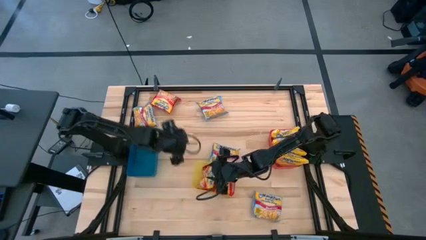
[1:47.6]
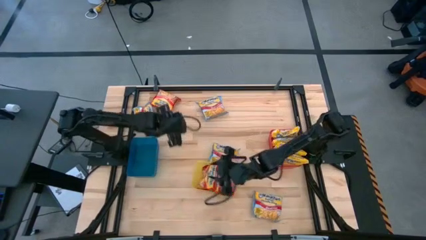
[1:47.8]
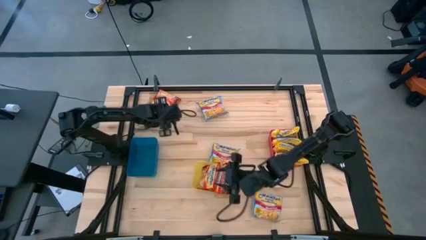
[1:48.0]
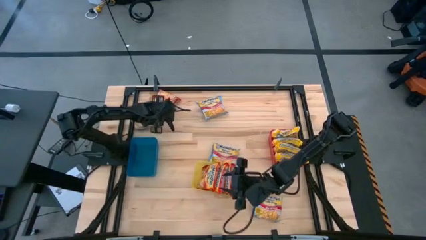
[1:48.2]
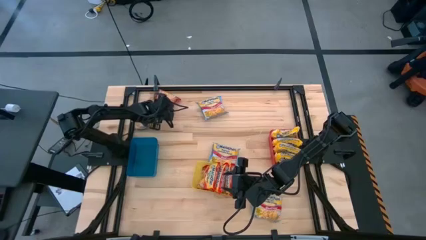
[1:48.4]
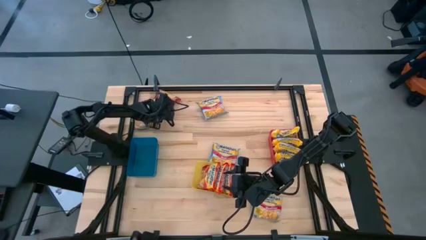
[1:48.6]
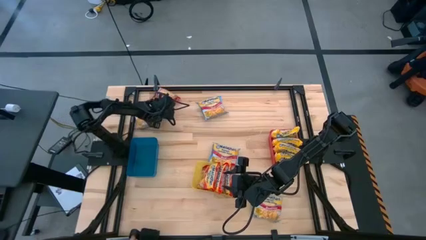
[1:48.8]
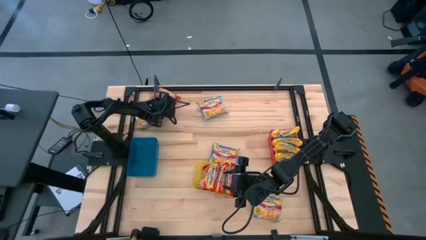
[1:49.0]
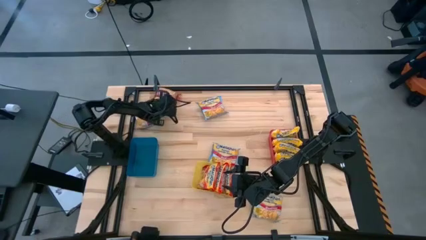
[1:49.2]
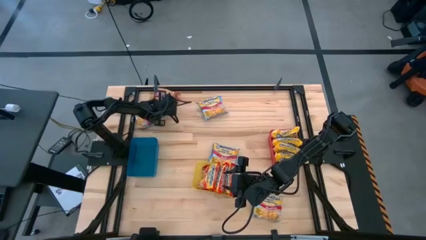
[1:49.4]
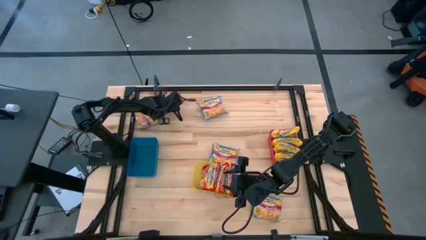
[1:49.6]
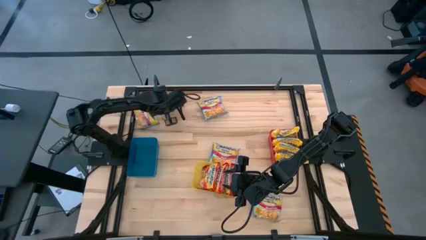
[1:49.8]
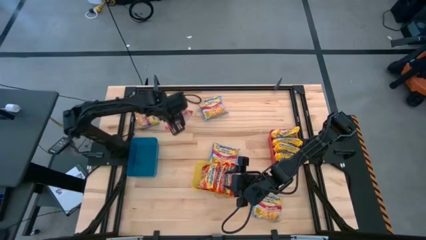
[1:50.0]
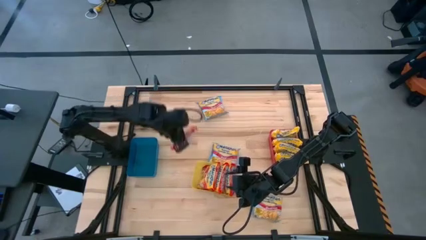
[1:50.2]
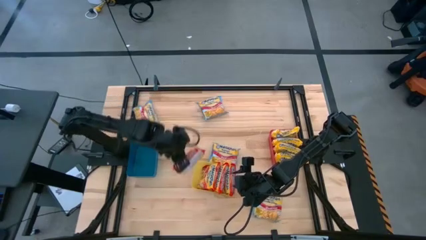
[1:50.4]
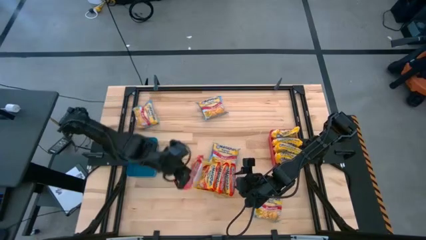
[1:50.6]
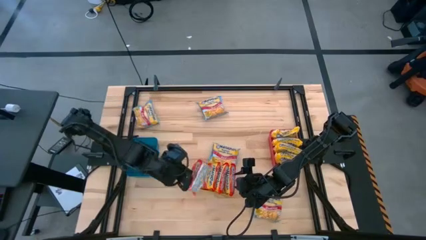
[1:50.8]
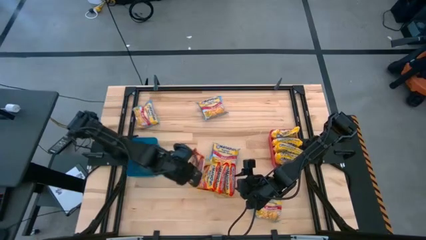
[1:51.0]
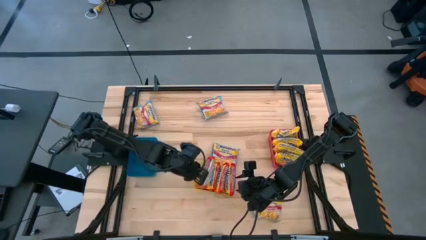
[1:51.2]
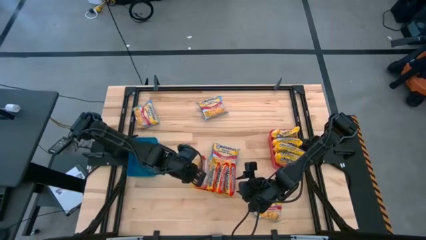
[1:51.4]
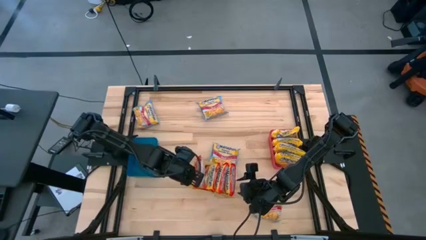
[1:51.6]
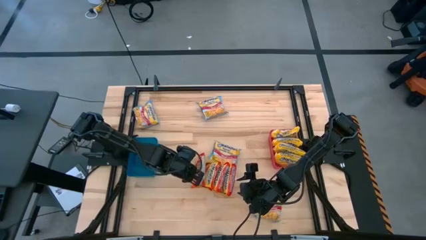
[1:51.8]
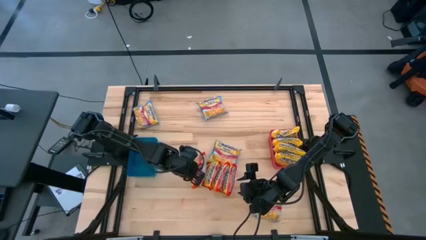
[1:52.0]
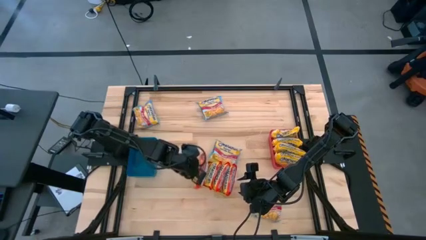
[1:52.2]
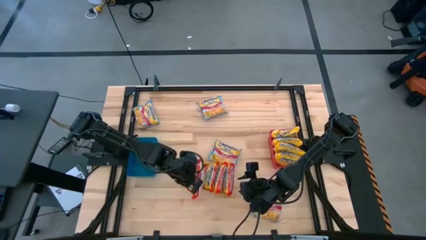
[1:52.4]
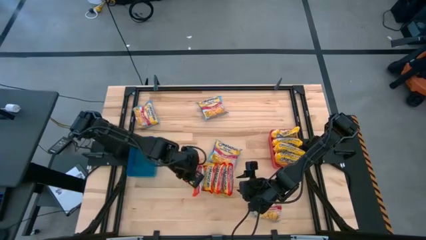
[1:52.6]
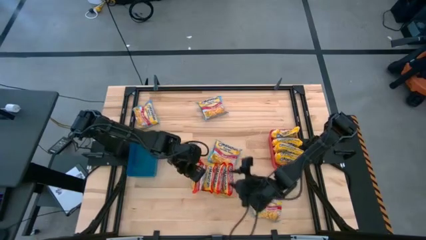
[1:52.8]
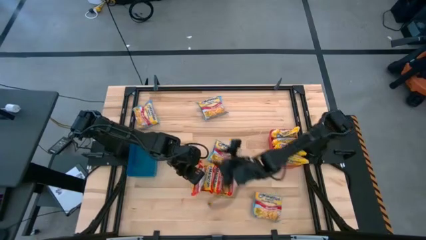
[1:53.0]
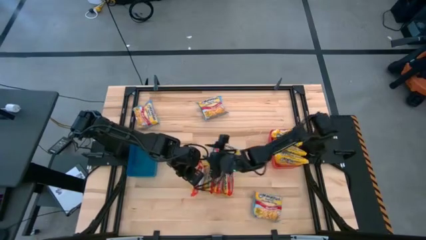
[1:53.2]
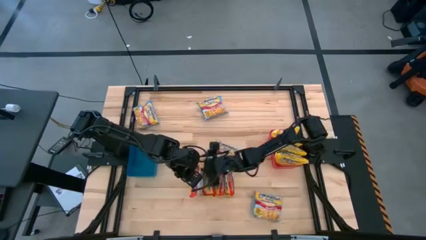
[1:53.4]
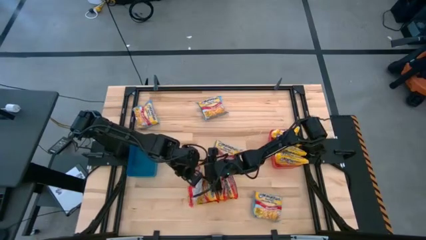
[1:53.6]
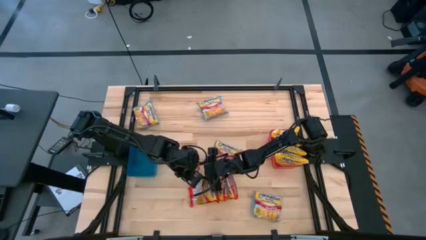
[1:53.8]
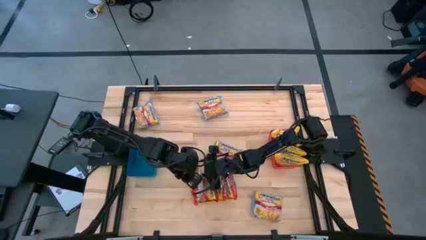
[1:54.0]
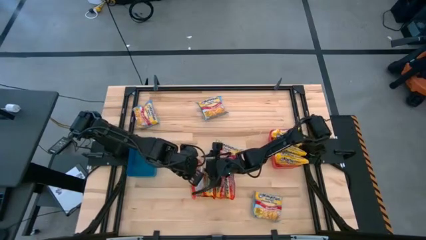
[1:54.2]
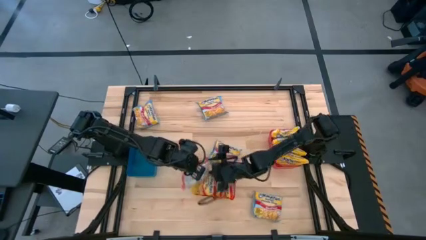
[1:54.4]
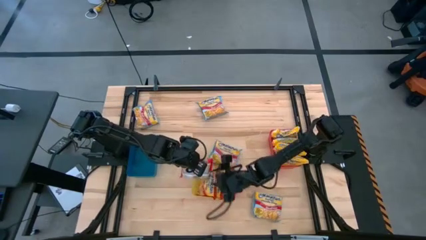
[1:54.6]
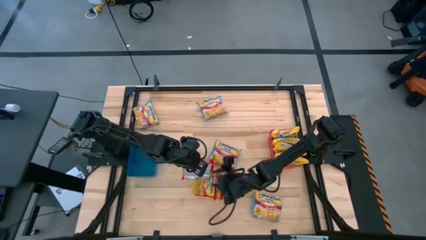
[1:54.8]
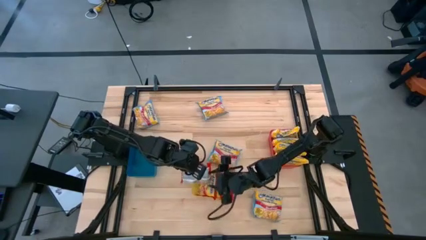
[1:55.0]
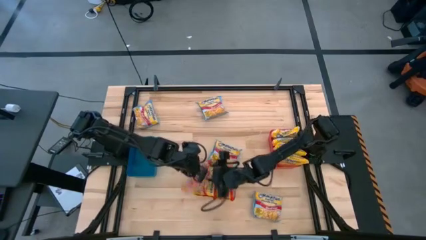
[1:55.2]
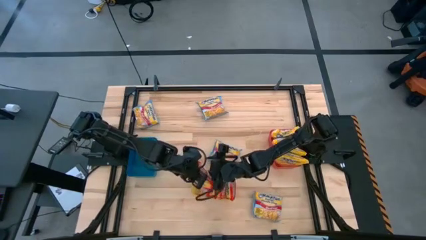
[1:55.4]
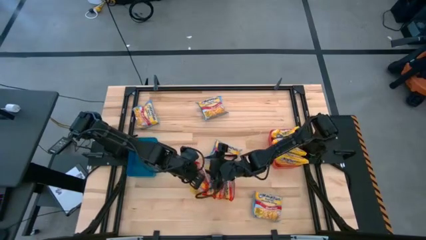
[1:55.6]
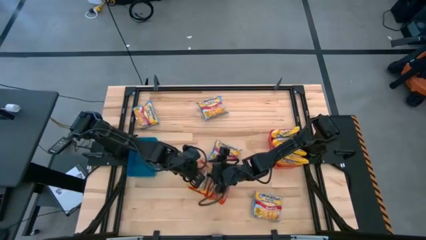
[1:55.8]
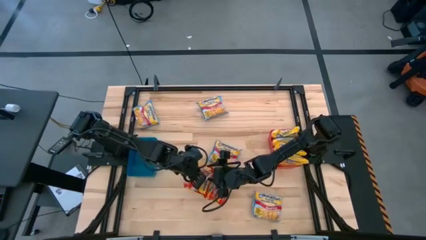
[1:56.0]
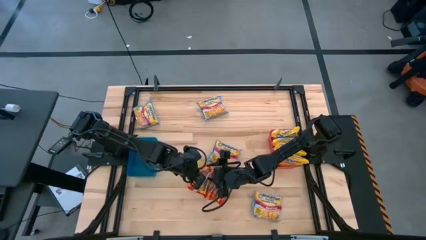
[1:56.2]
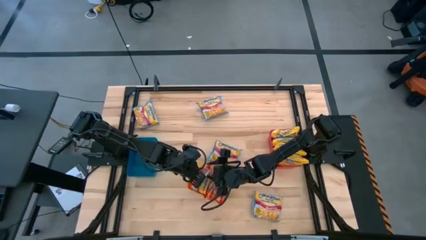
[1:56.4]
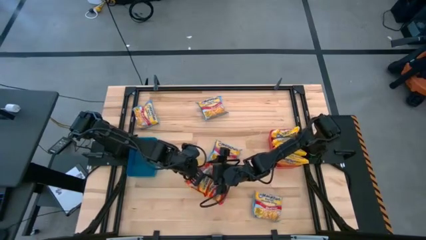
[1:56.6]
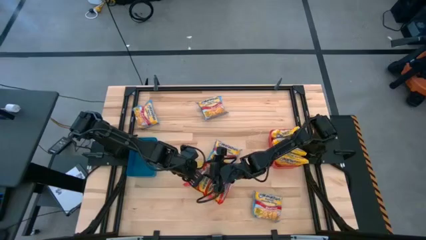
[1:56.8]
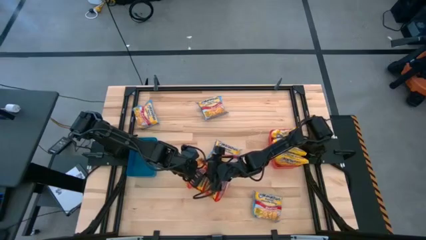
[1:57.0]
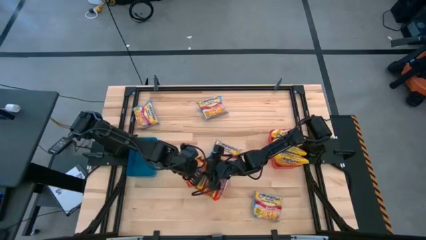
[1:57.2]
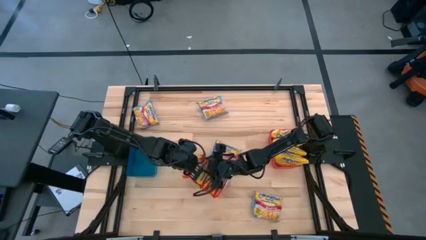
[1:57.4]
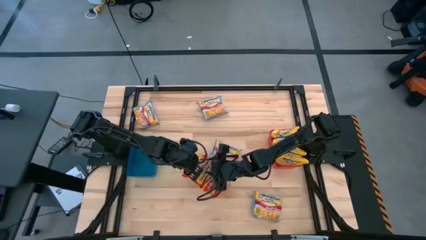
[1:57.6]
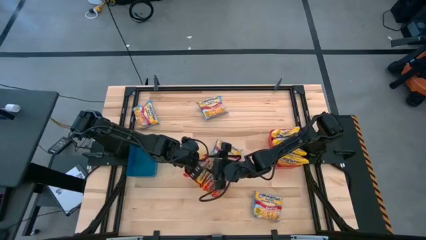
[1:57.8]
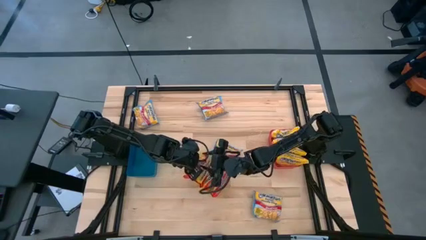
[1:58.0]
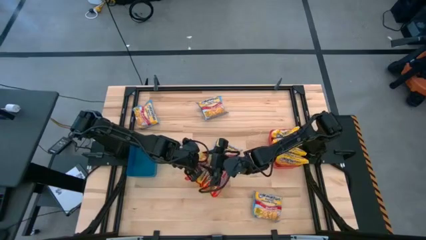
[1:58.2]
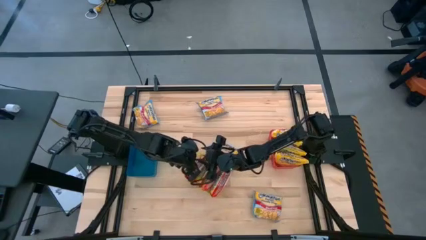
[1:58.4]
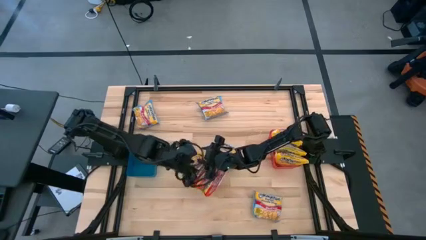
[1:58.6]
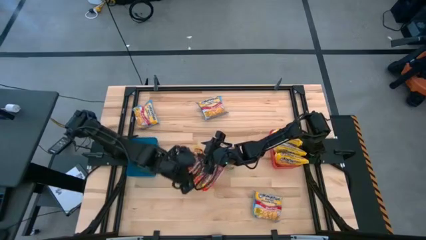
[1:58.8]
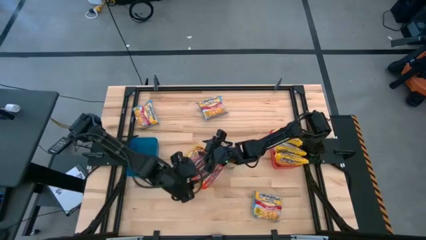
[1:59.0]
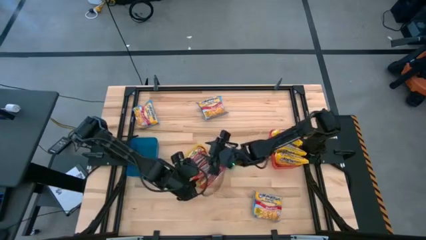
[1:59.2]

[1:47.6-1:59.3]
Task: Sort Maruchan noodles
Put the red noodle pack into the yellow bin

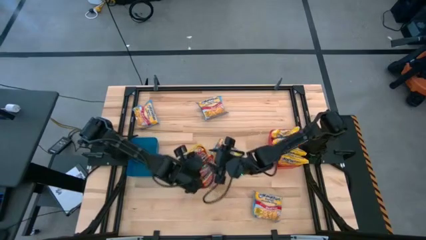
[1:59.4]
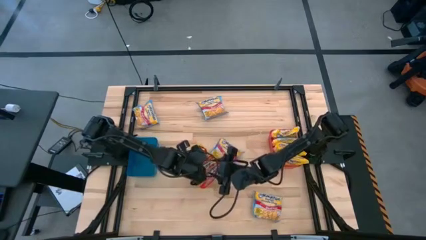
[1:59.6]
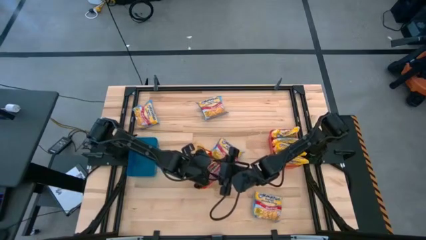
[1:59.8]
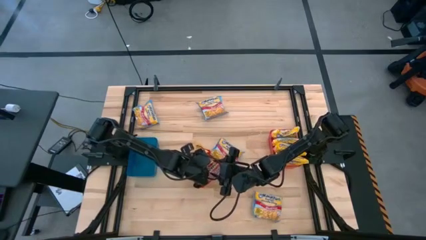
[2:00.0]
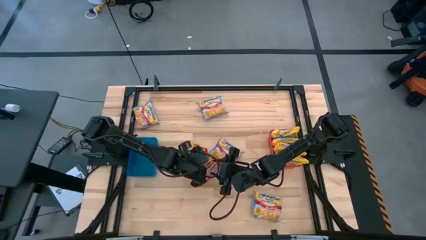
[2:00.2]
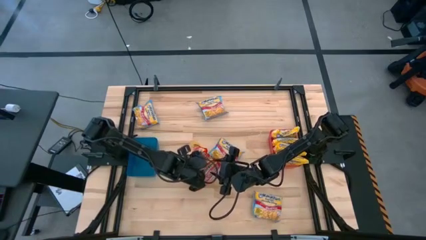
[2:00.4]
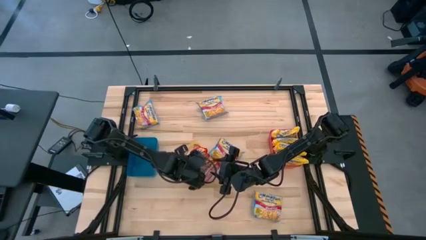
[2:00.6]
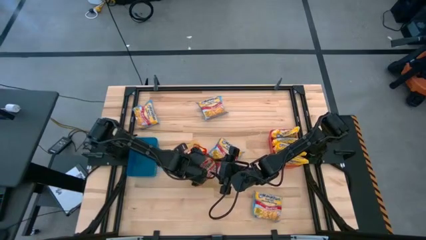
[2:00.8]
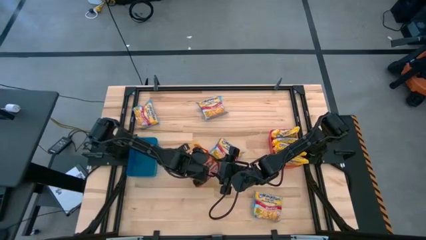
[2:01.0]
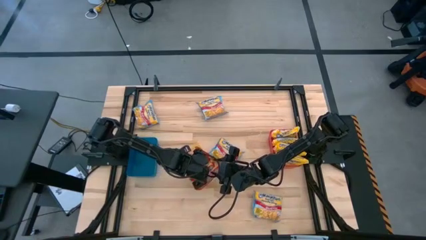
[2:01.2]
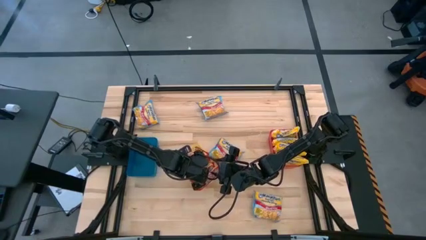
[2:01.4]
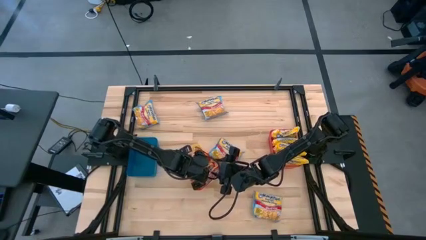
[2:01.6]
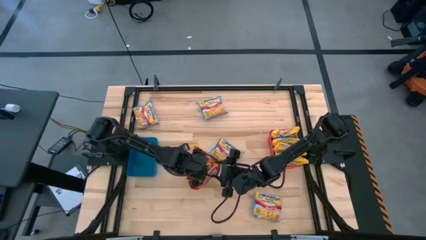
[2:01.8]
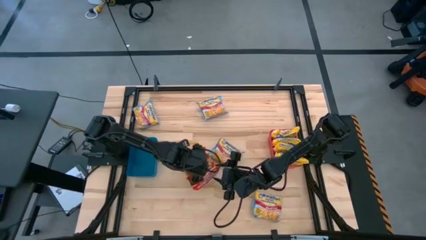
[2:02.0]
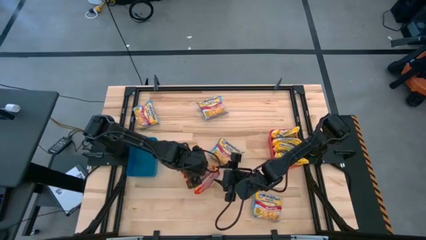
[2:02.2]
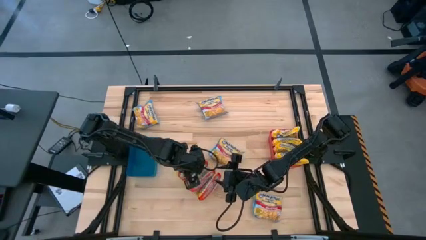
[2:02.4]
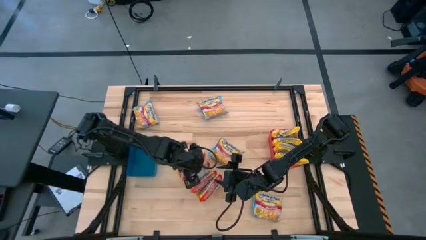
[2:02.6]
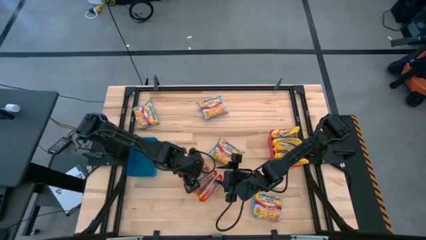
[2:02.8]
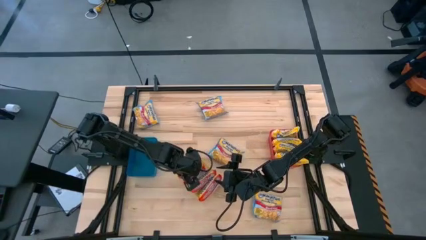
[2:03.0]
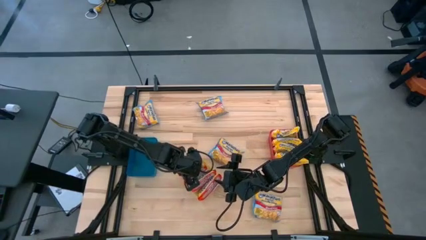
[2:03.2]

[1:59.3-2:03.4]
Adjust the red noodle packs in the yellow bin
